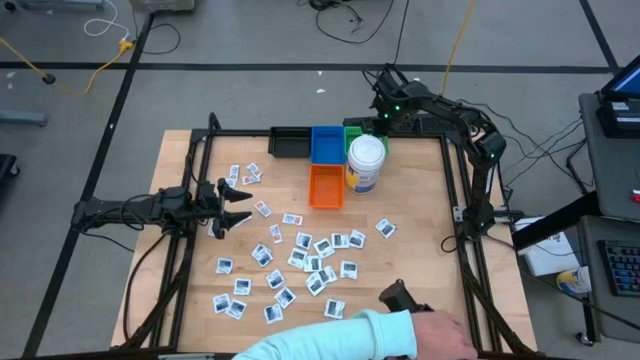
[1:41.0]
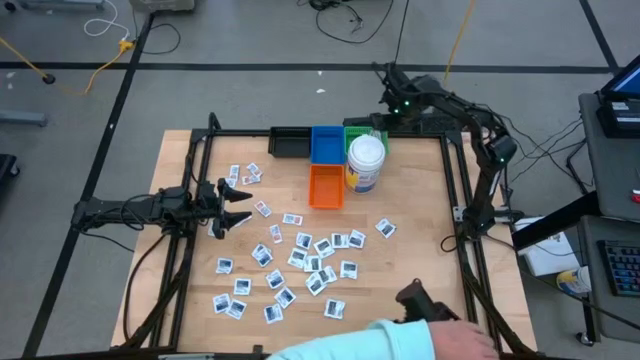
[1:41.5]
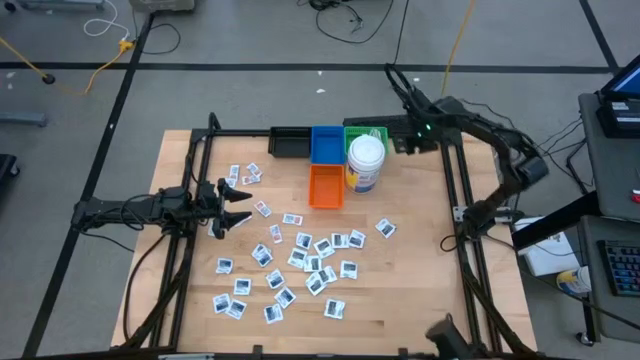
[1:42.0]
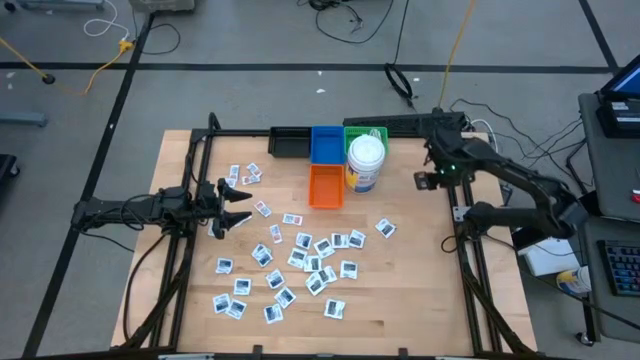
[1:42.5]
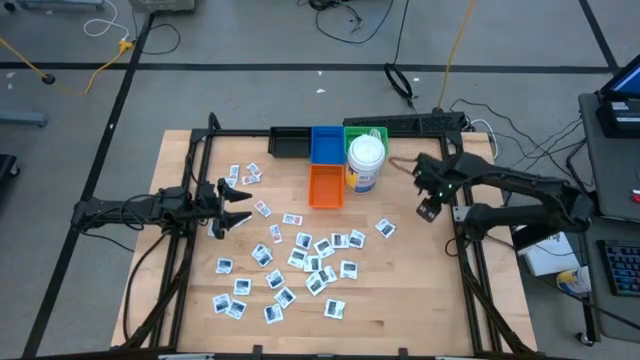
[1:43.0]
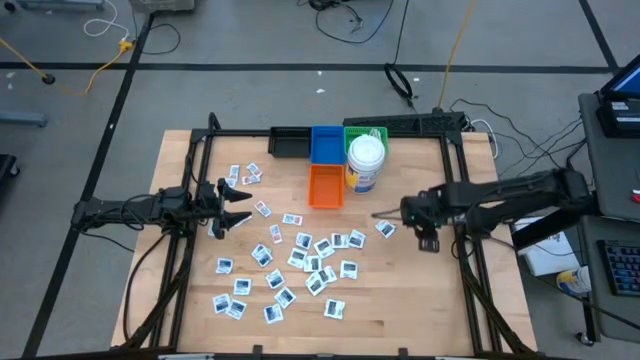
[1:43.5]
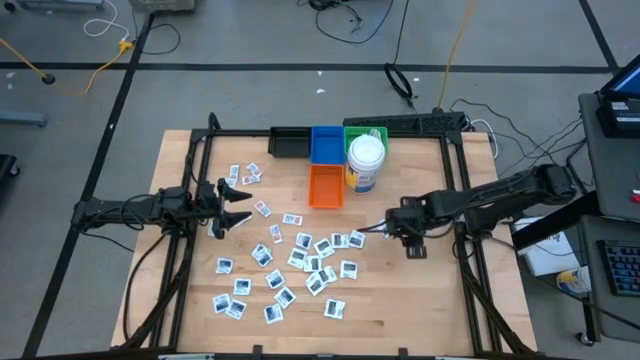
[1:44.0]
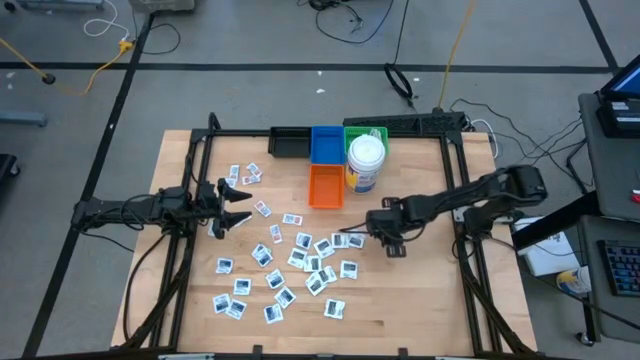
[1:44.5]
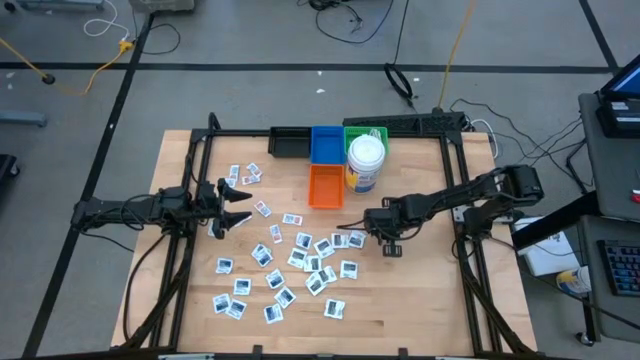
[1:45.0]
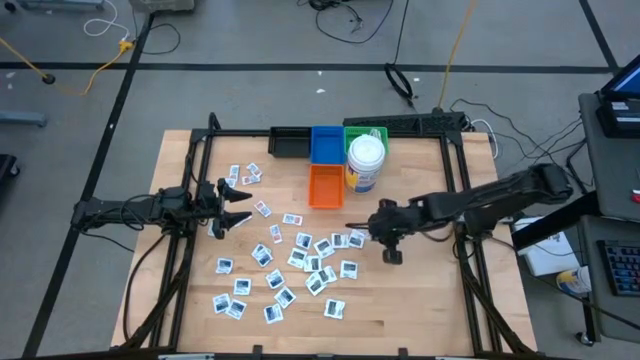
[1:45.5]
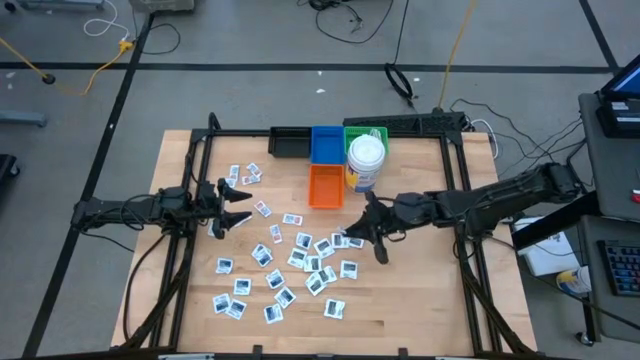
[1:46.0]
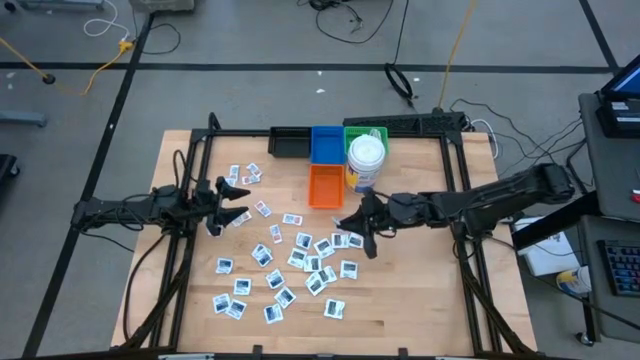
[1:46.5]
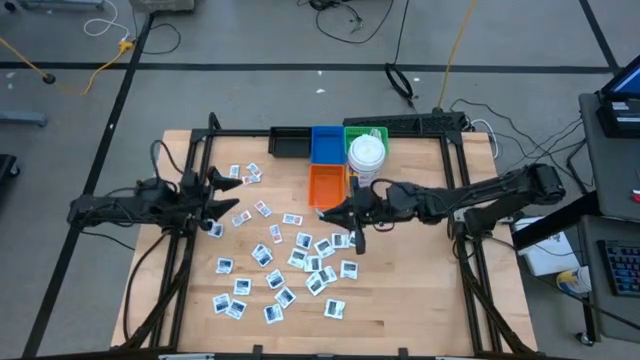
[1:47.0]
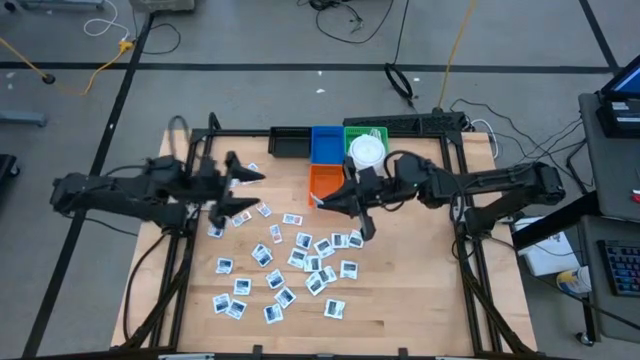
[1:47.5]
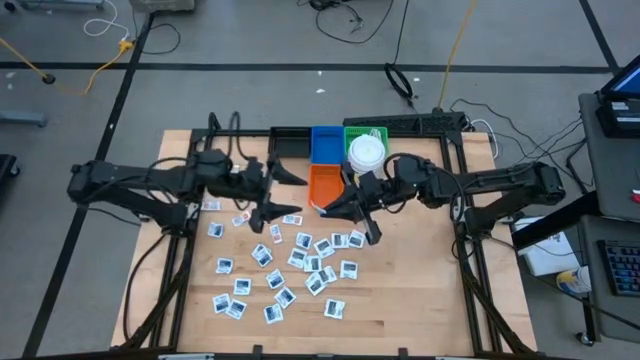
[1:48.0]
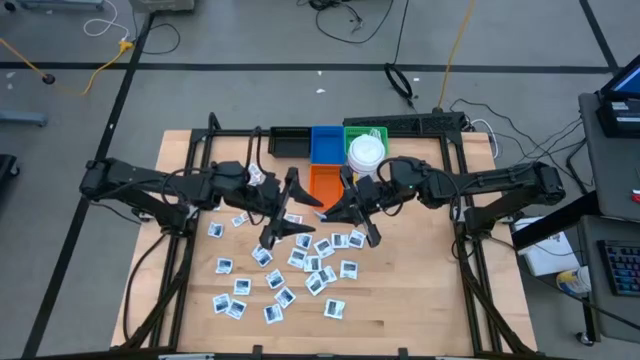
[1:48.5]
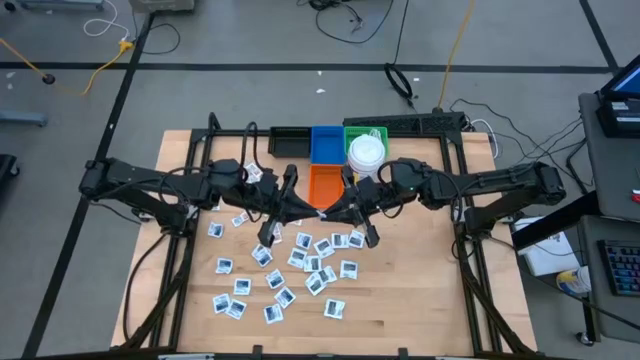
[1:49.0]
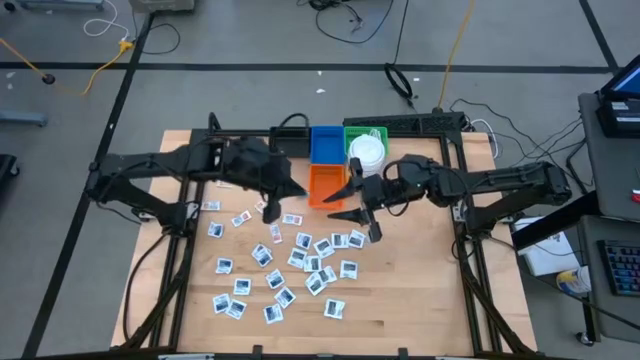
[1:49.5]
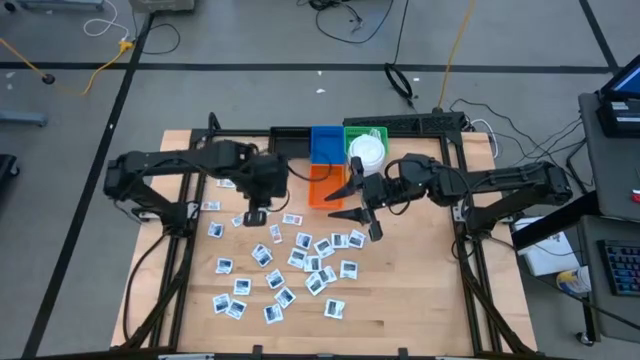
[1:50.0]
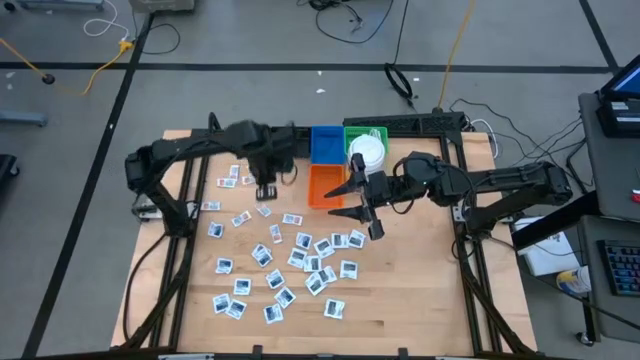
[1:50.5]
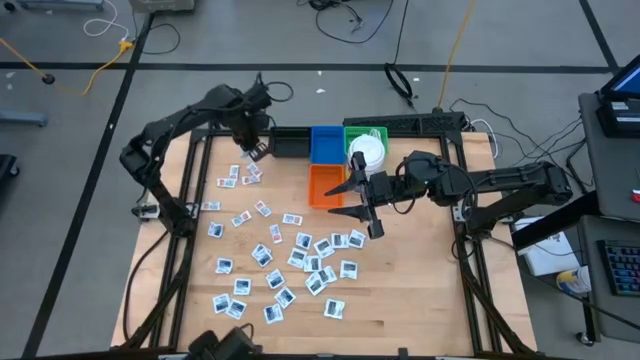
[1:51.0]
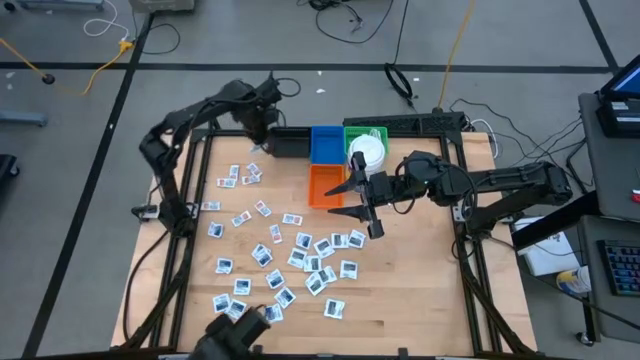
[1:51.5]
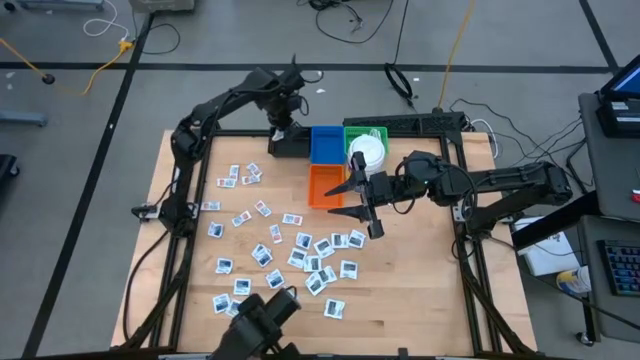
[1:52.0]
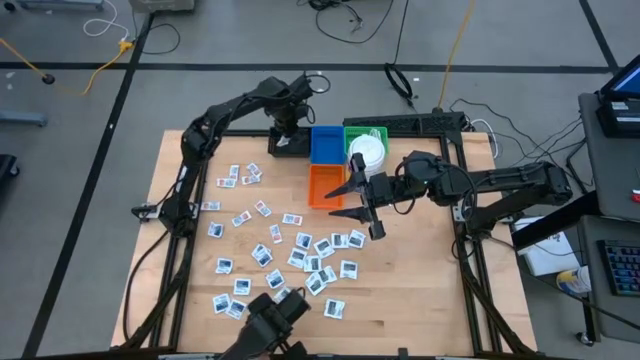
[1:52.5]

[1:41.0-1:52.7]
Task: Pick & Place First Aid Supplies
Put the gray towelette pack into the black bin

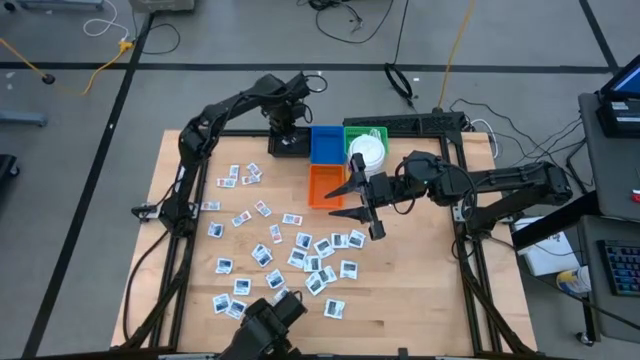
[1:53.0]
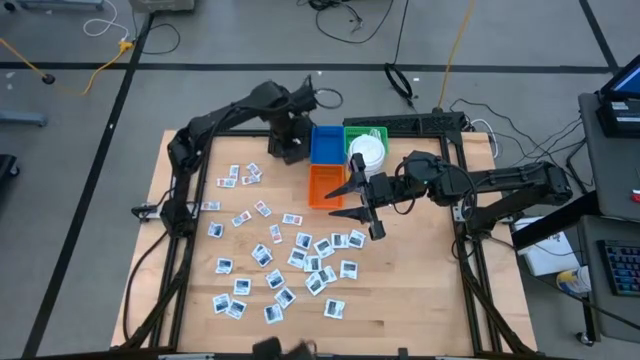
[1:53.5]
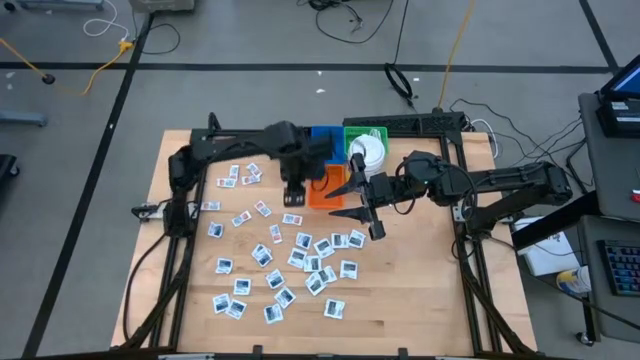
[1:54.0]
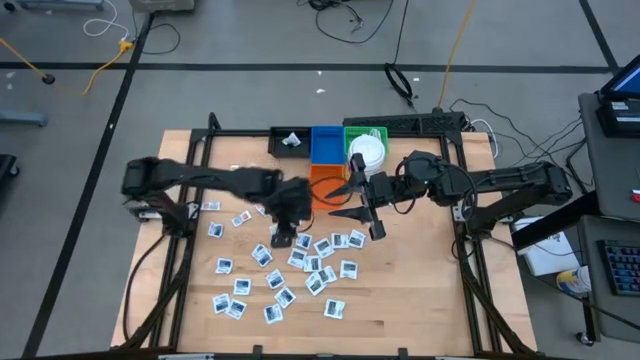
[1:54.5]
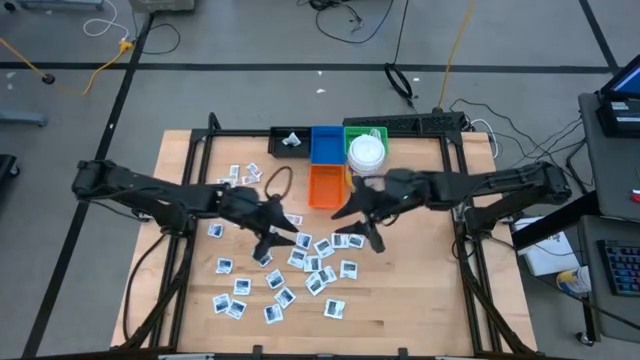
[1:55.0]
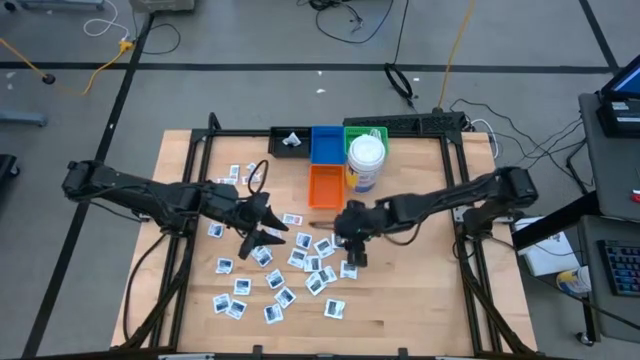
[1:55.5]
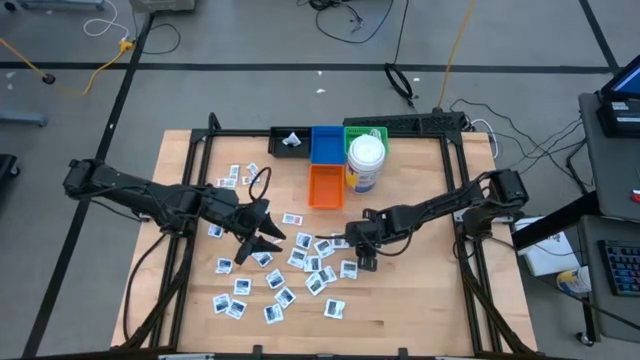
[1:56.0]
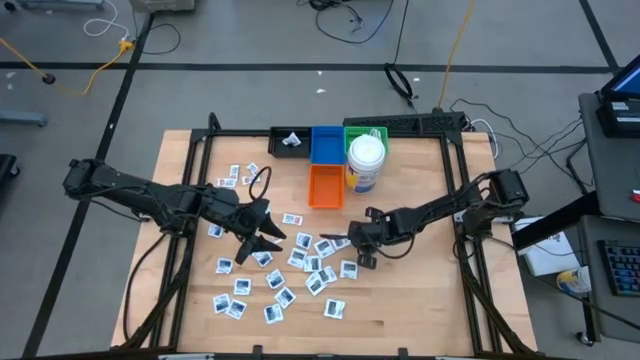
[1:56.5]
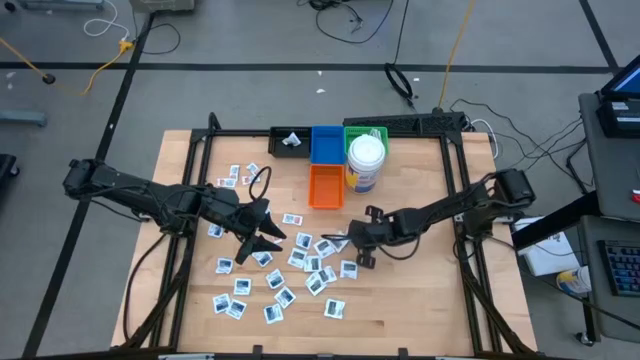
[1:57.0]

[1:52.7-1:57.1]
Put the gray towelette pack into the black bin

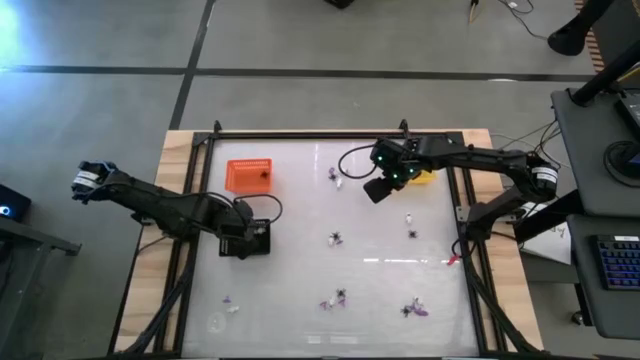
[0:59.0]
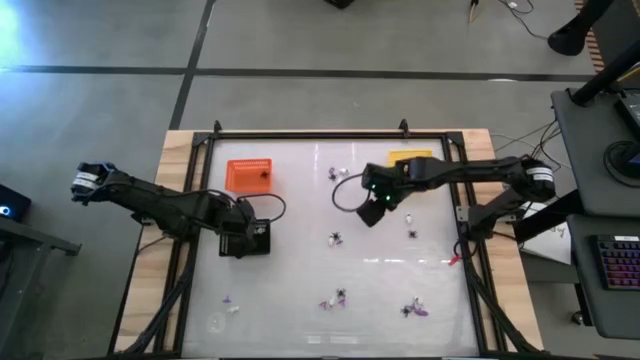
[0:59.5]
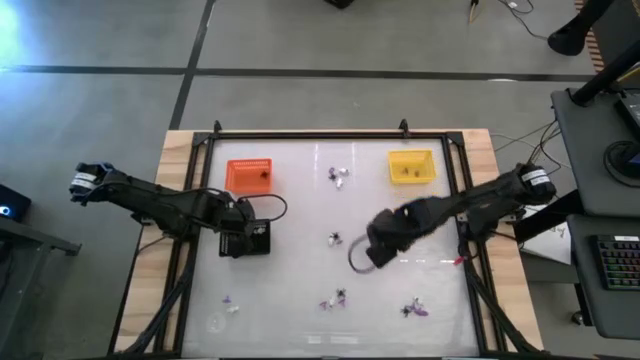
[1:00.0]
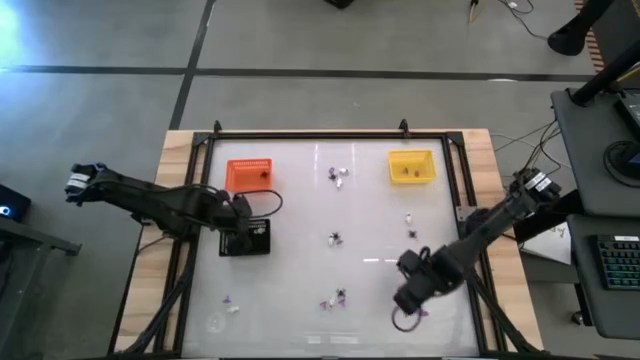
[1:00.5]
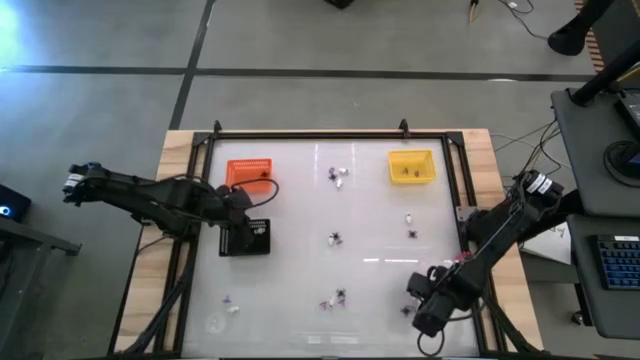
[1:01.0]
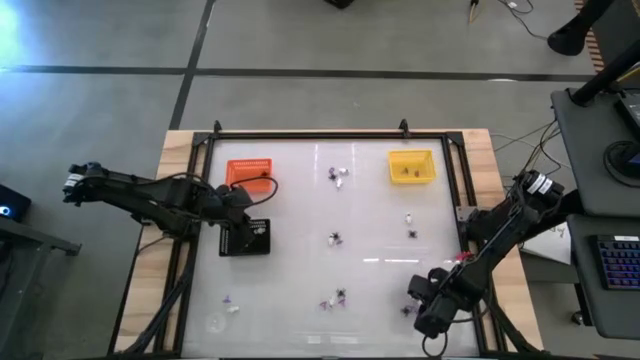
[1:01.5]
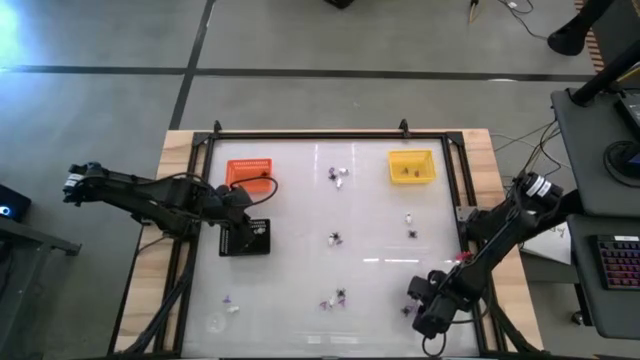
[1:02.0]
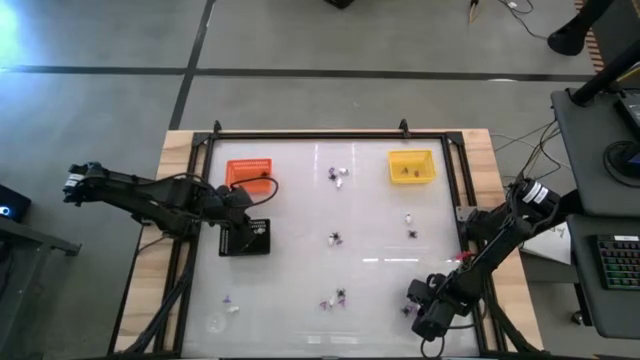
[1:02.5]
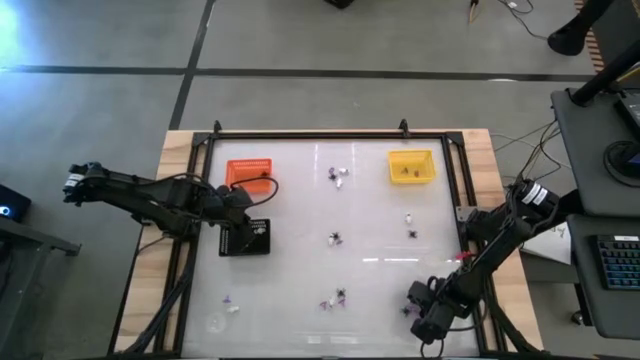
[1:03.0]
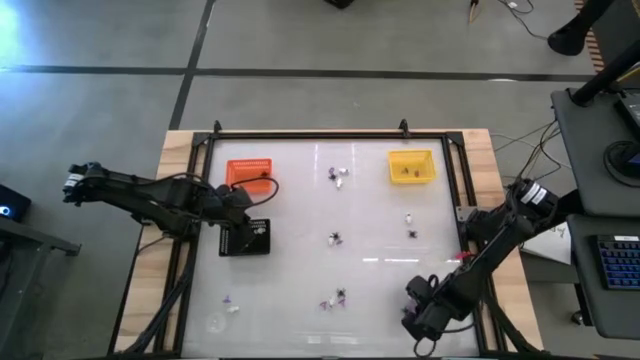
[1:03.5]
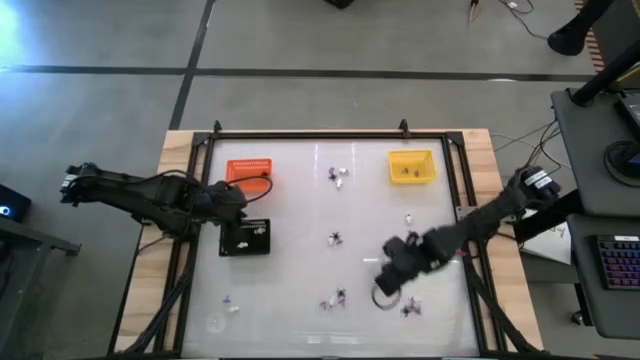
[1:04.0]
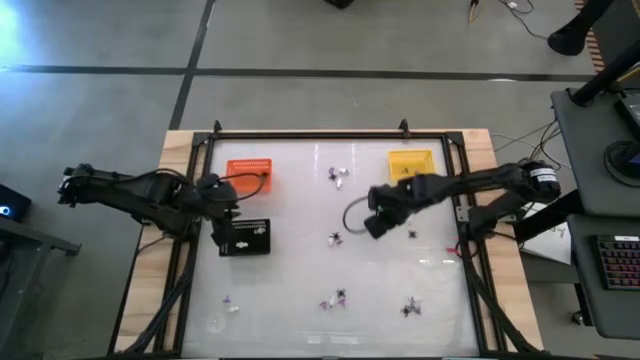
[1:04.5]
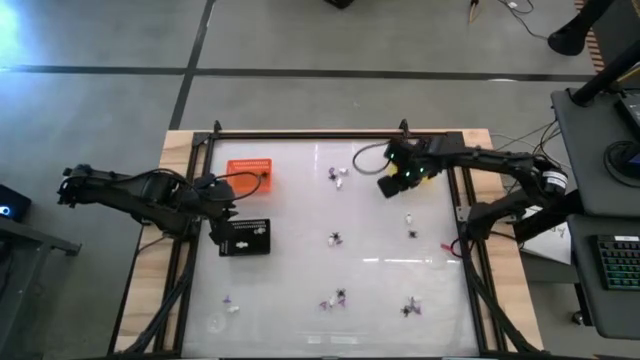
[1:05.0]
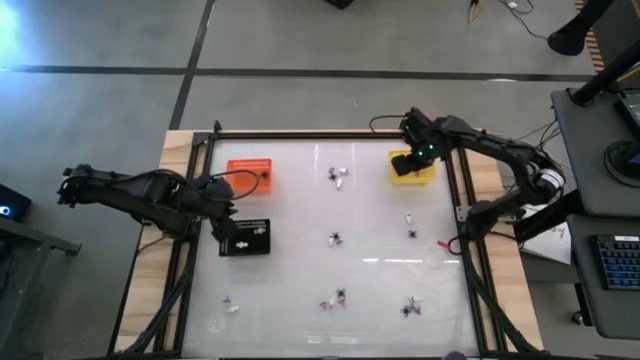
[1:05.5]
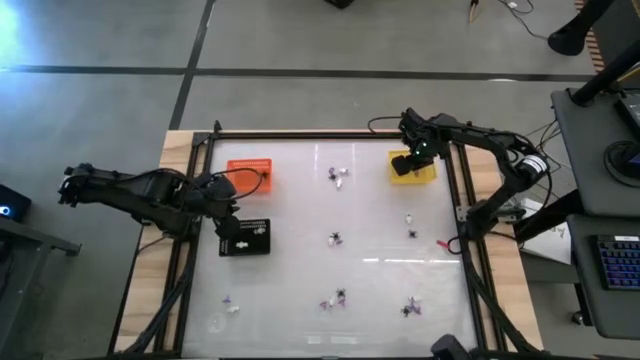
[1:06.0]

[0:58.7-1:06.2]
Task: Sort Halloween decoration
Put the purple witch hat toy into the yellow bin
